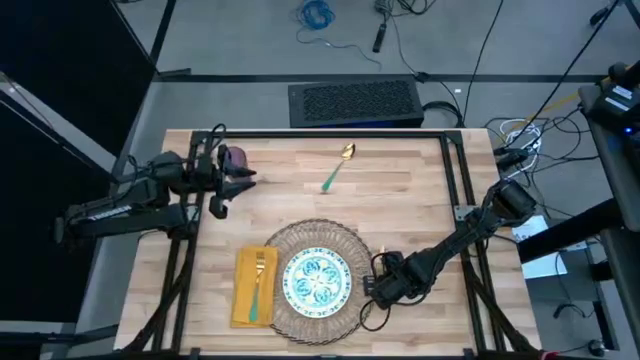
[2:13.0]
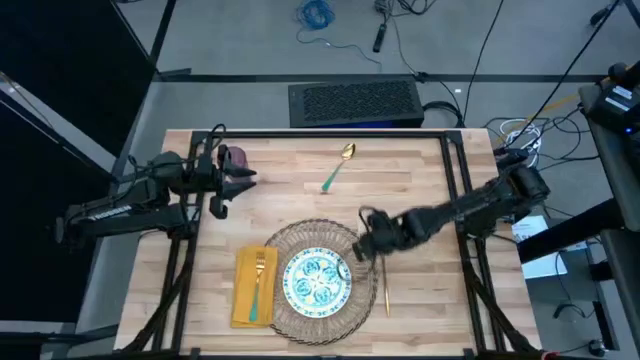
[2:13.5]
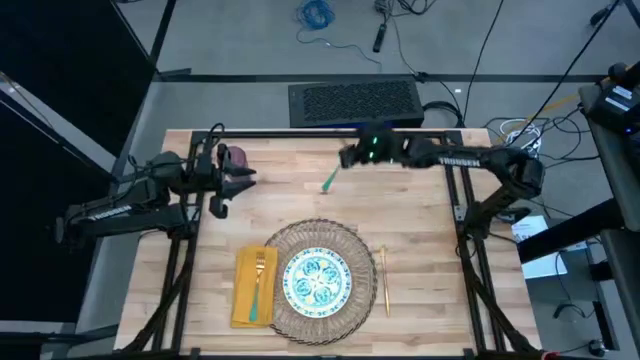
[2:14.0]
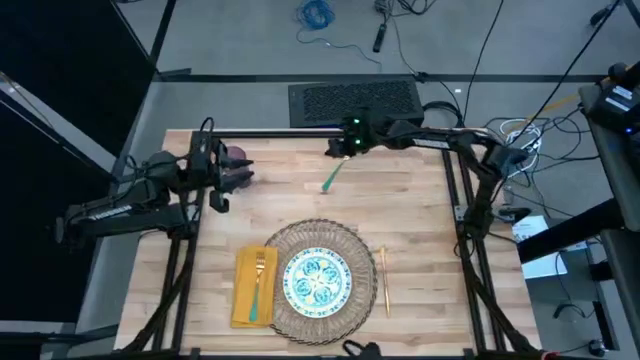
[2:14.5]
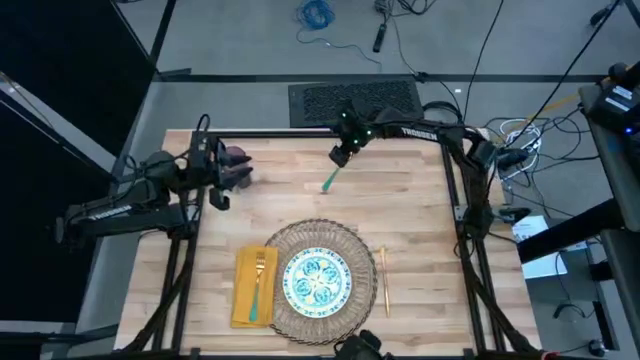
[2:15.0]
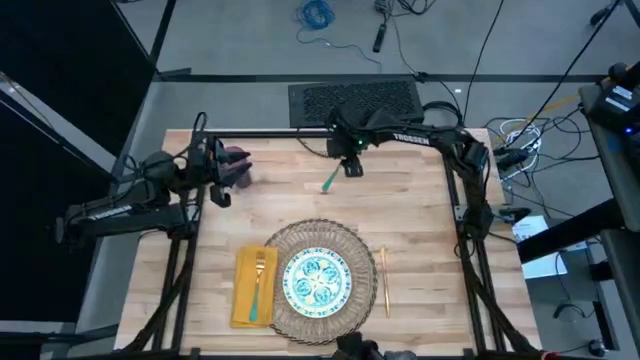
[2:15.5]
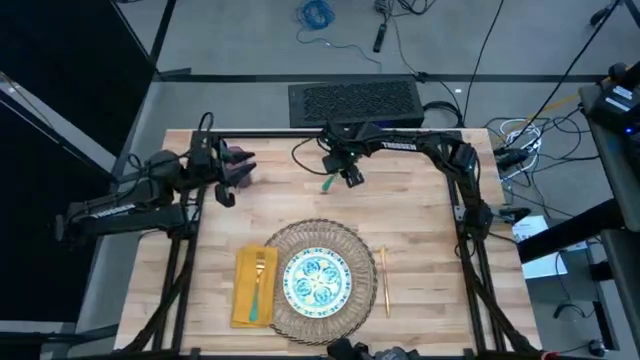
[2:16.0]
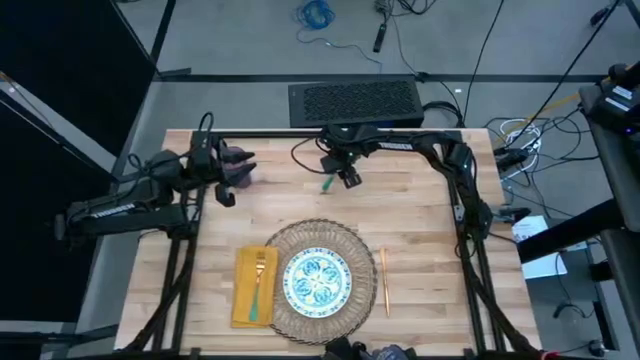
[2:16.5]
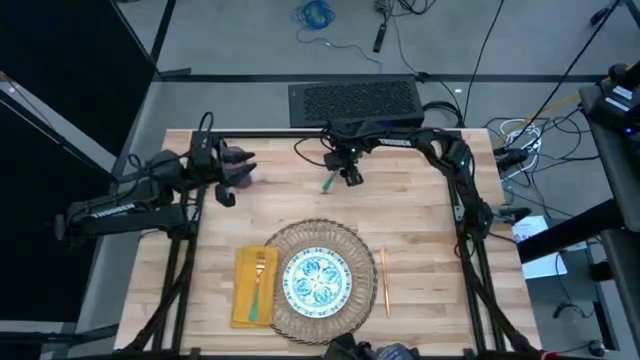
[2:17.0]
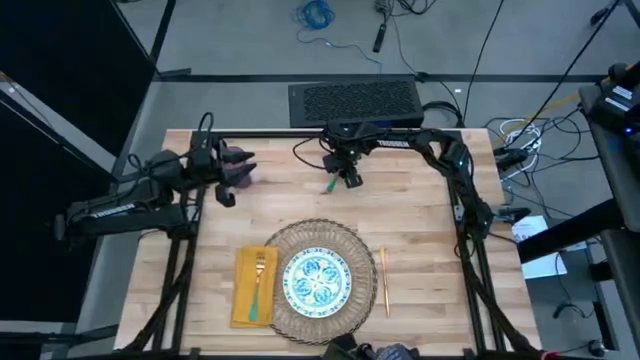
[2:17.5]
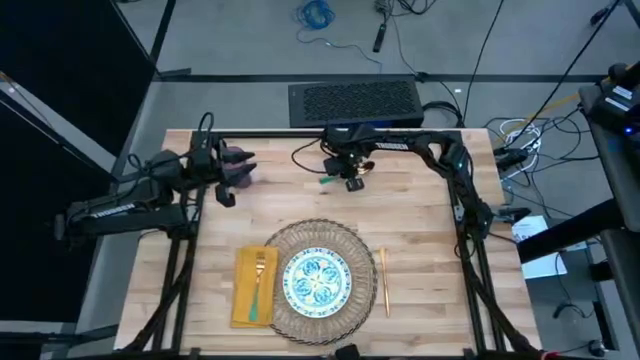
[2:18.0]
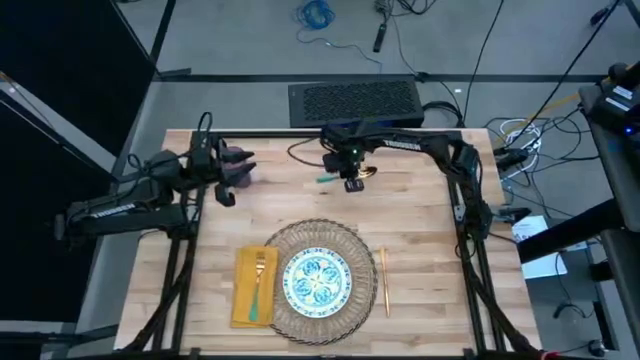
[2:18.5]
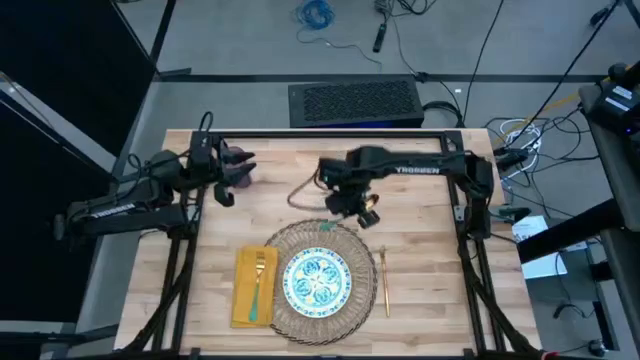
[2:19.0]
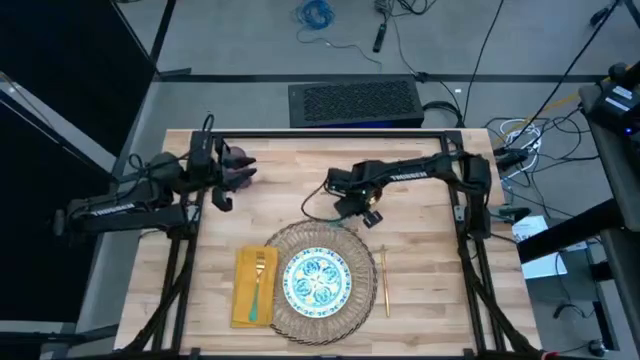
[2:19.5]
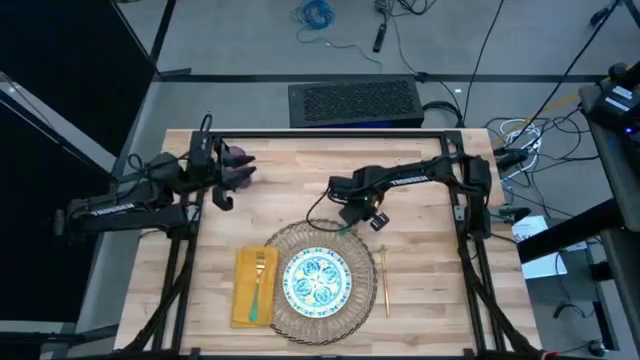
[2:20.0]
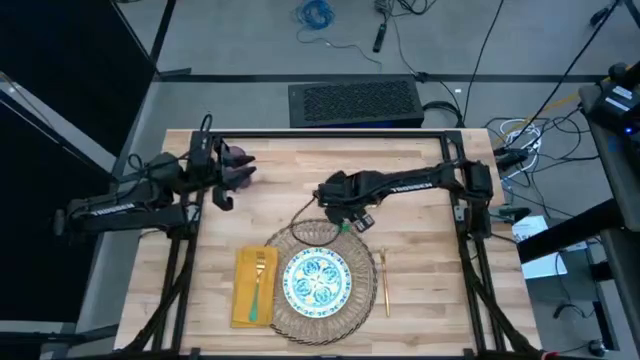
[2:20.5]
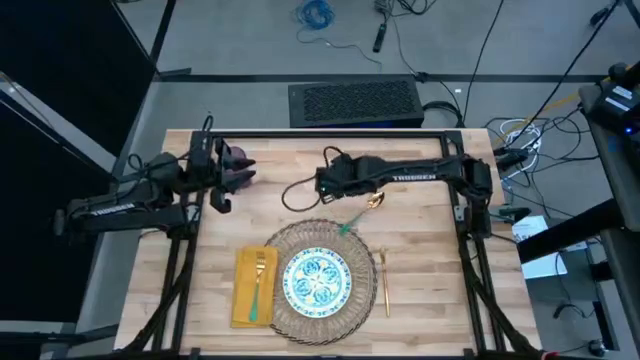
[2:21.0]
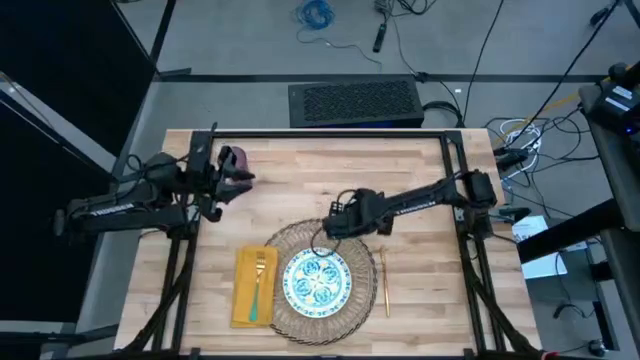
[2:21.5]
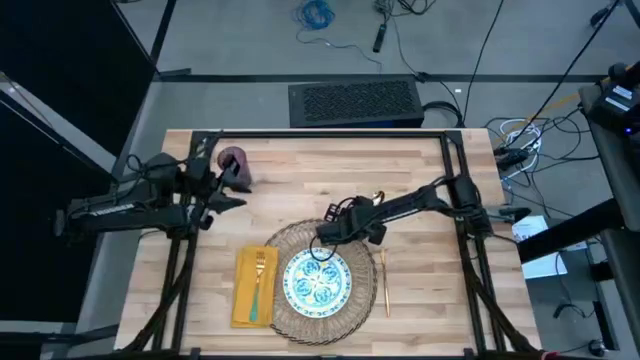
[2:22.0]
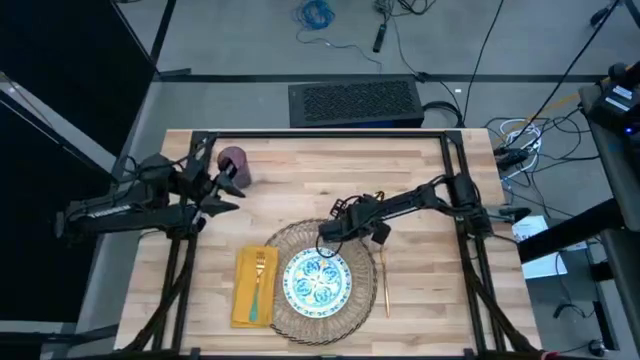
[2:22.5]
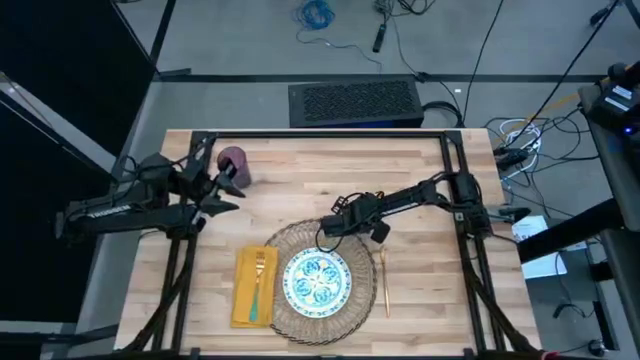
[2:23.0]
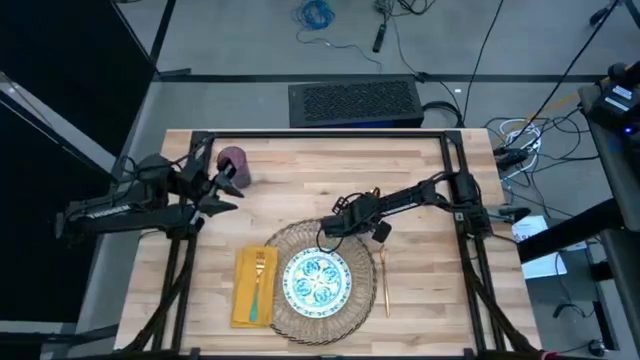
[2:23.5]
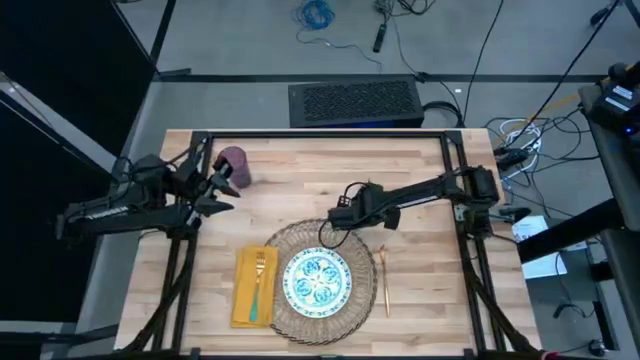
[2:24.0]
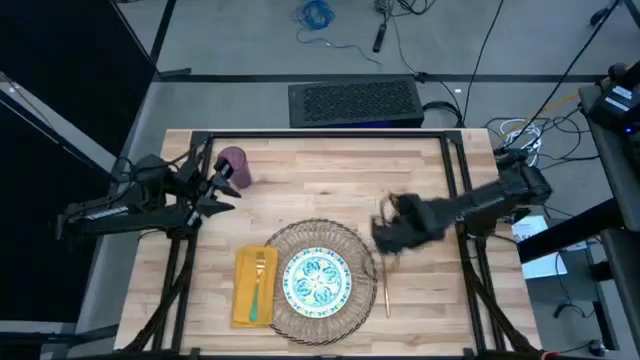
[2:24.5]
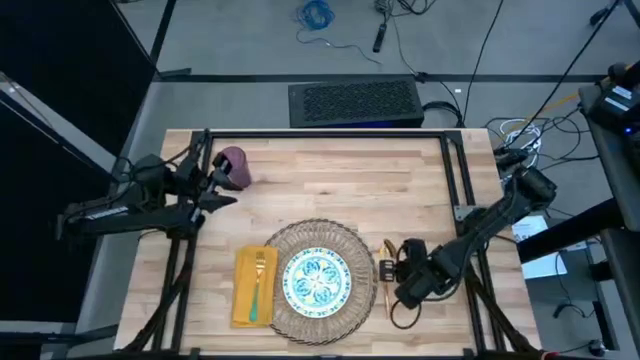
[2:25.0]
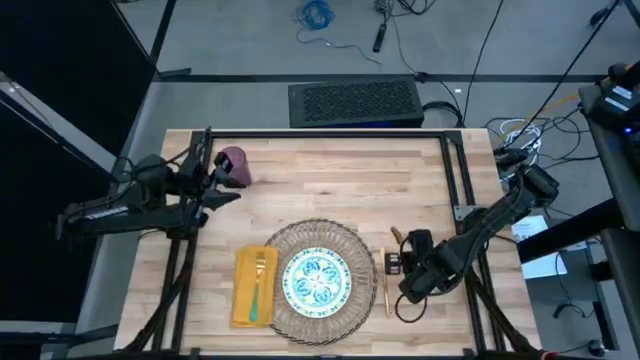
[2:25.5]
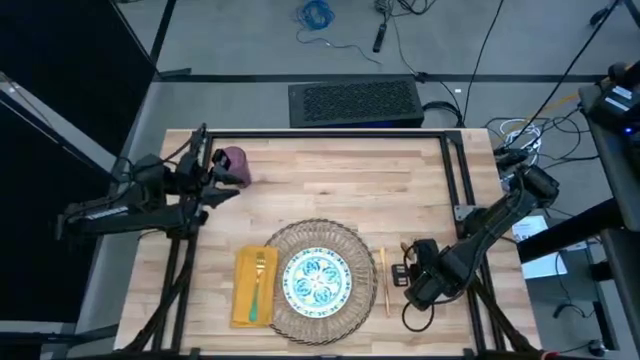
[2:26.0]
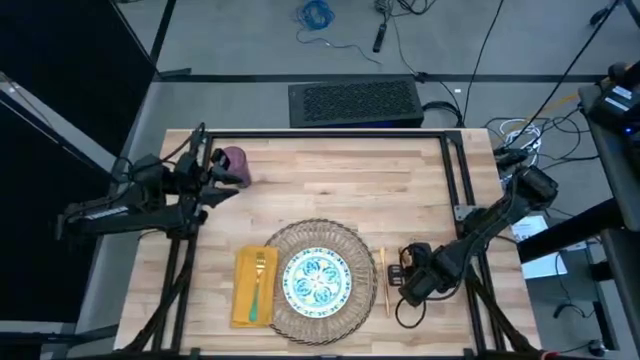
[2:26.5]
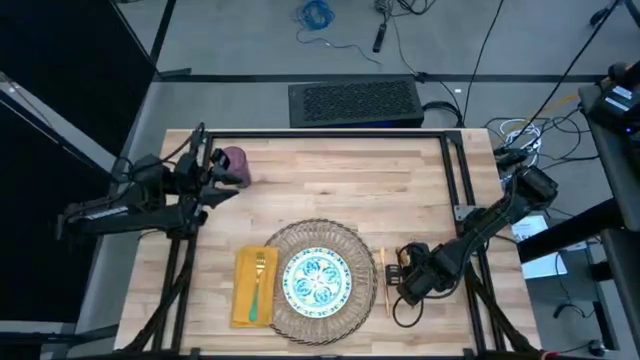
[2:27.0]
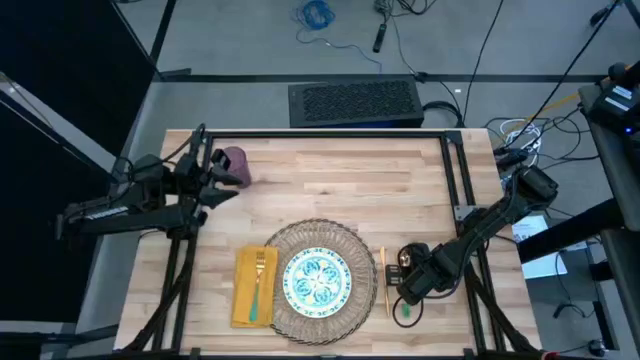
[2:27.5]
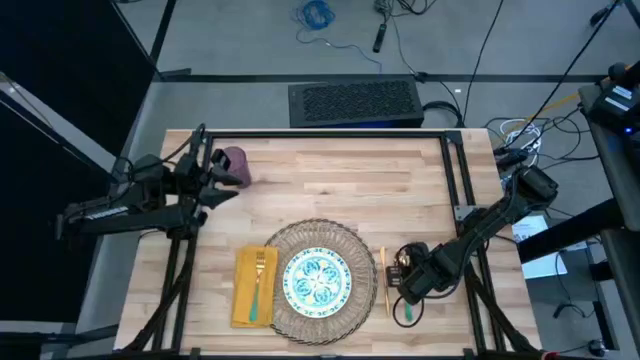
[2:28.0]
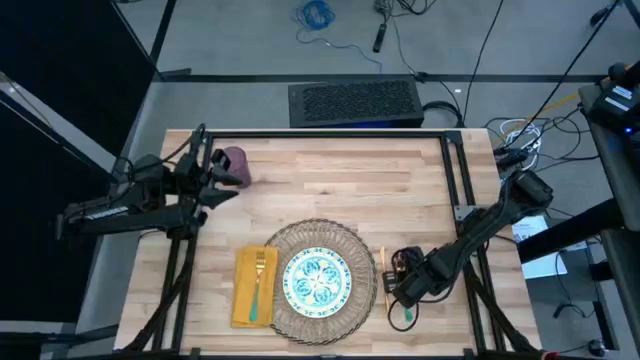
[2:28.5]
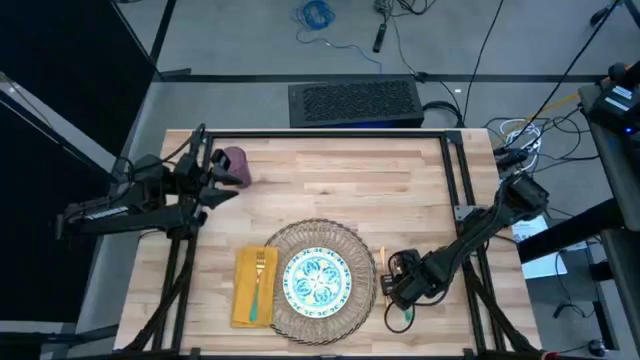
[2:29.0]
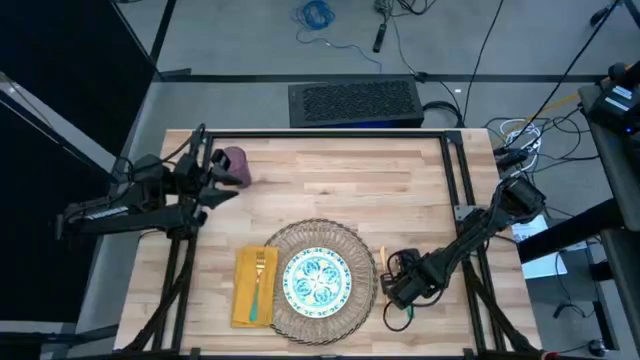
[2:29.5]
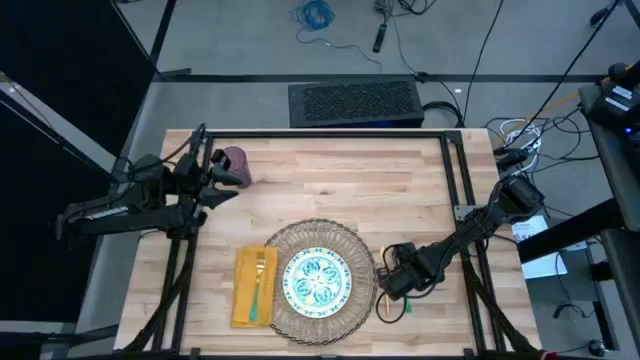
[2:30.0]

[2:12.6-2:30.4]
Task: Set table place
Put the green spoon to the right of the gold knife

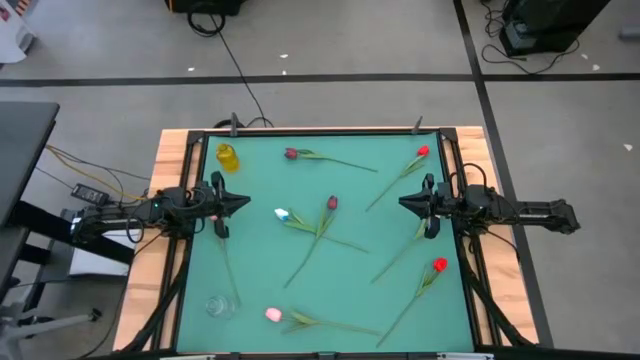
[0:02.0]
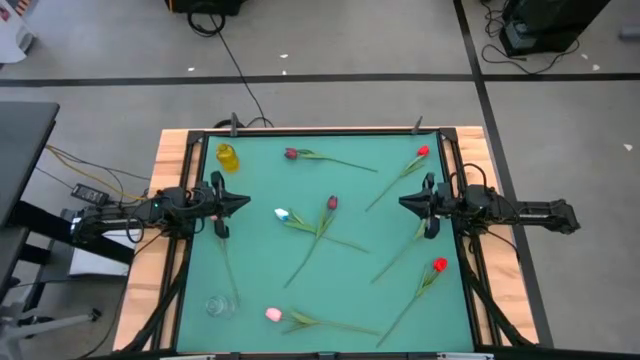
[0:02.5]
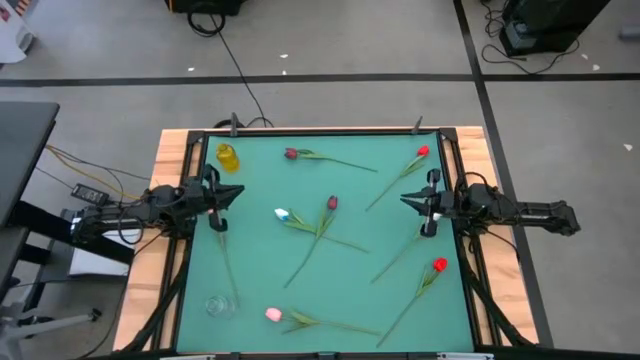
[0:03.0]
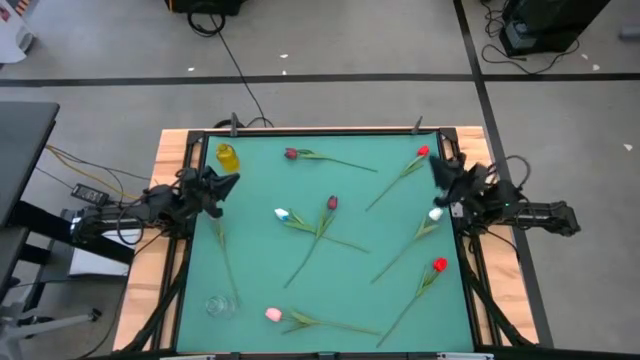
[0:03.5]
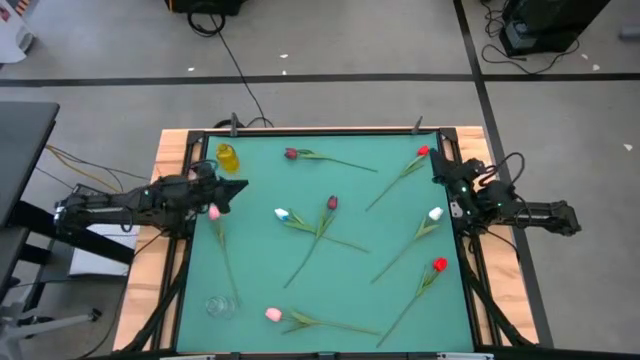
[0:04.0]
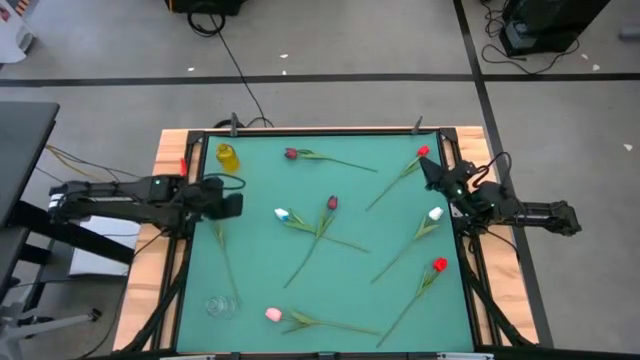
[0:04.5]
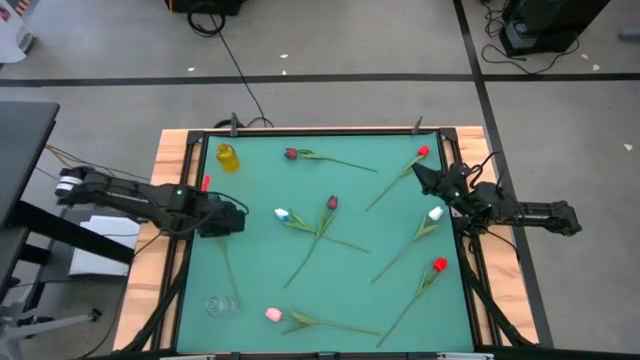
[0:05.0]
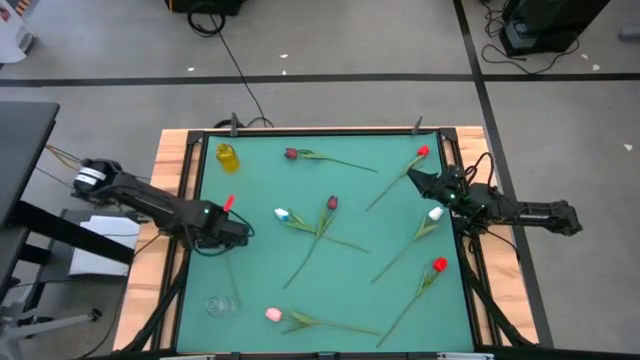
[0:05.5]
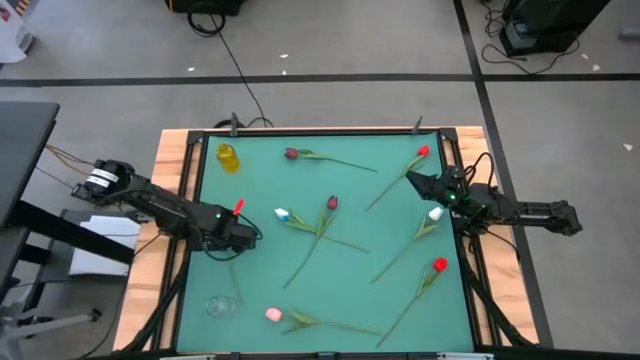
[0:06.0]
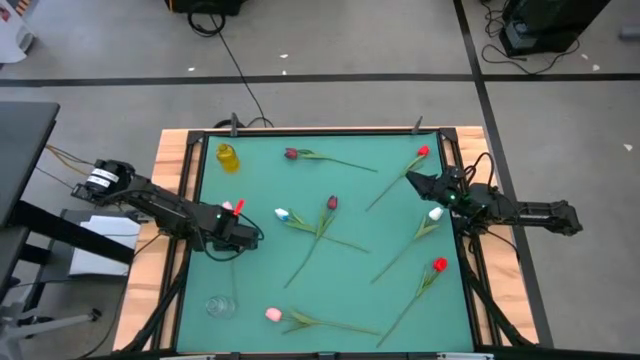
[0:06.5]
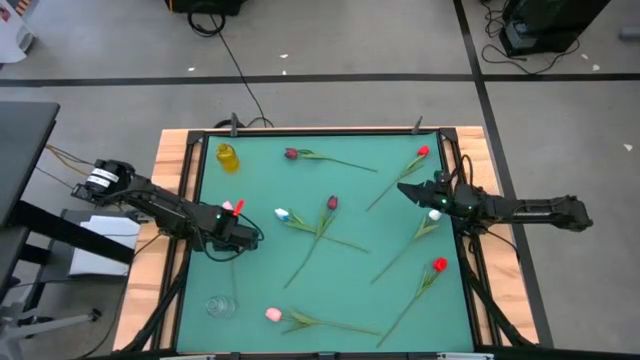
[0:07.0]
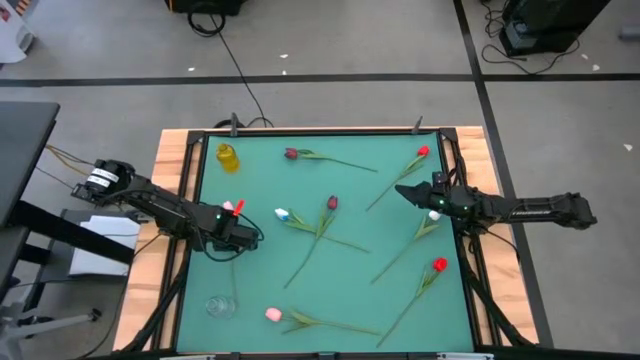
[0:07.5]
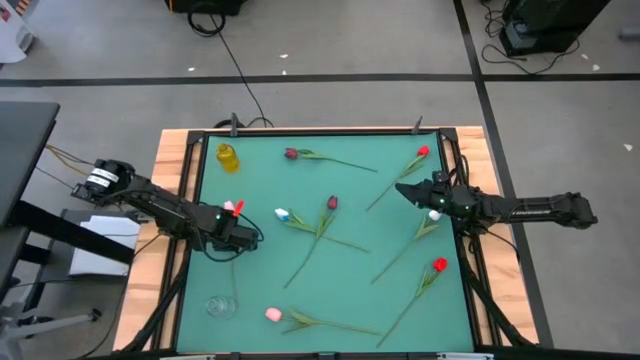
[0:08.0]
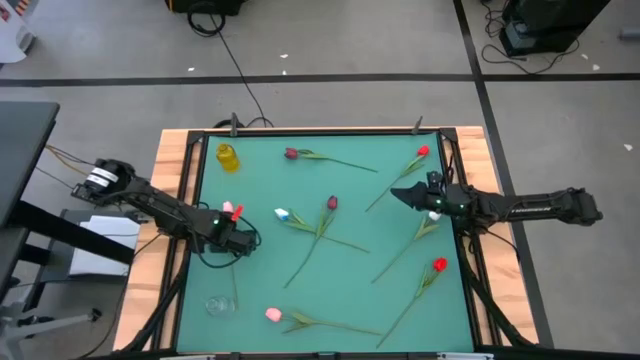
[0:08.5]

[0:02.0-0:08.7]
Task: Sort flowers into vase by color
Put the right white flower into the yellow vase
